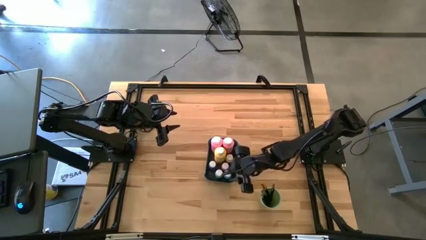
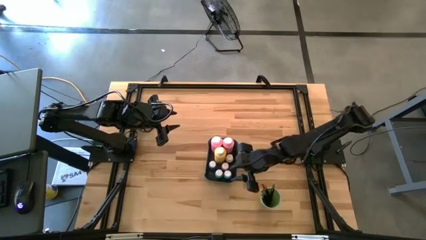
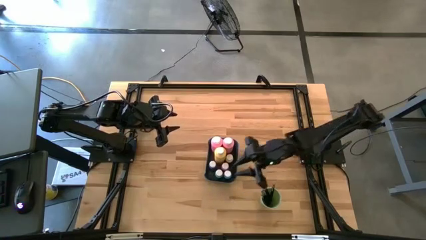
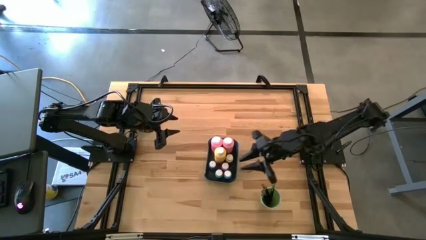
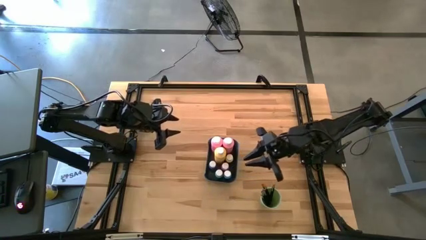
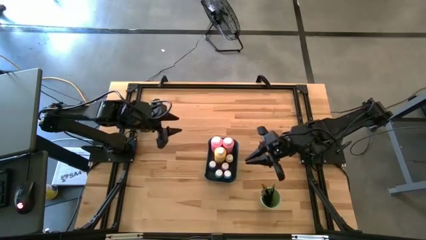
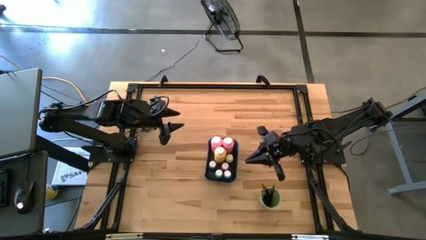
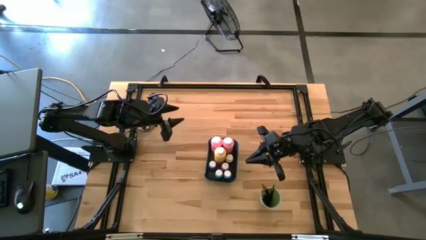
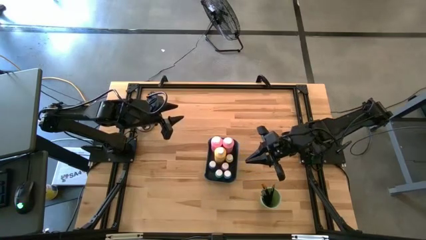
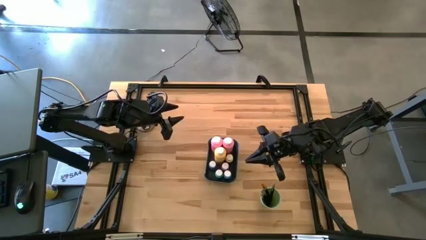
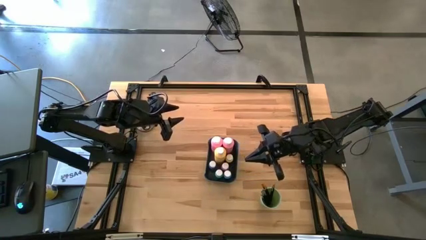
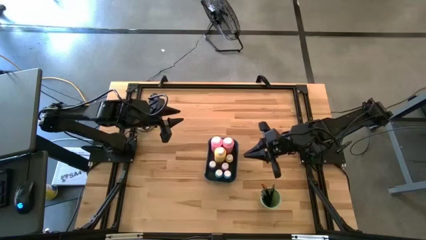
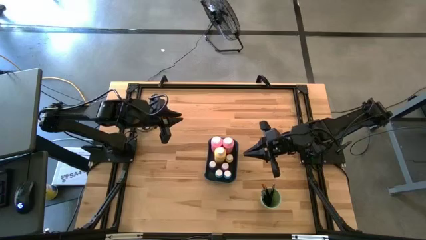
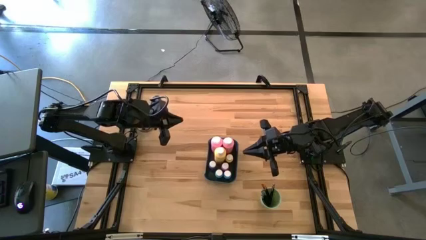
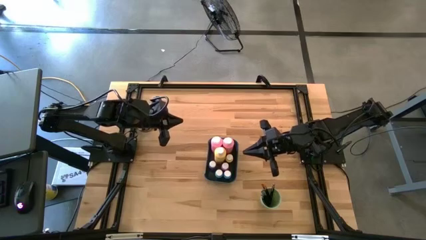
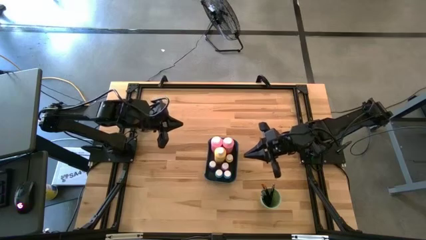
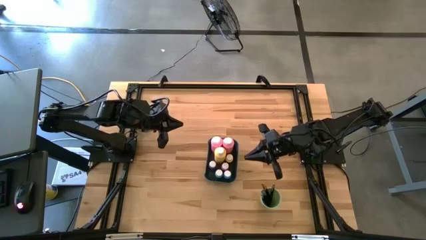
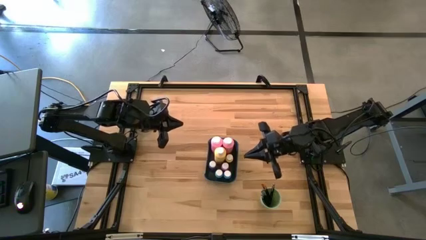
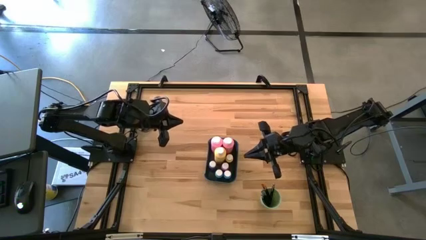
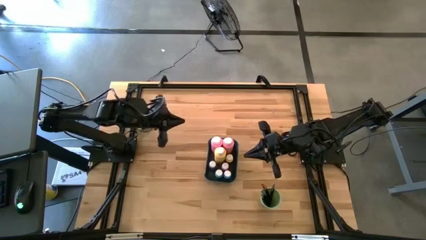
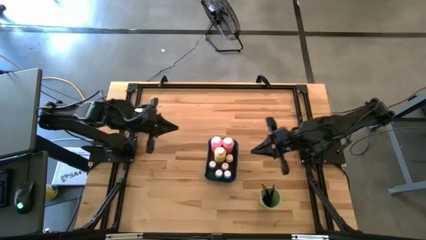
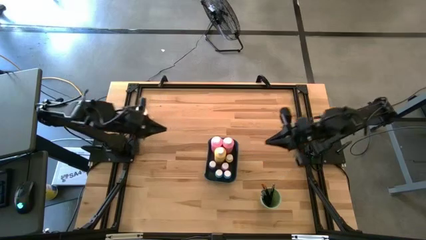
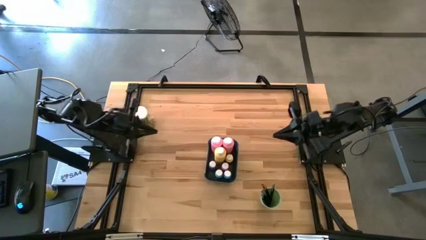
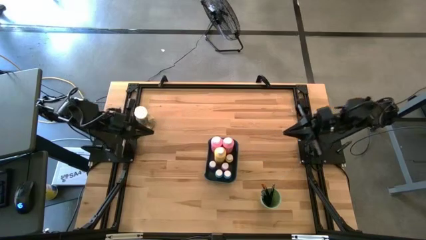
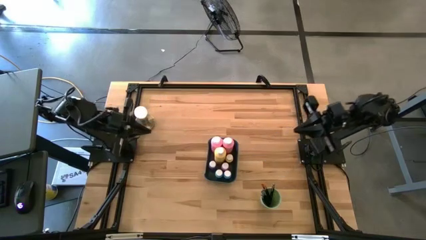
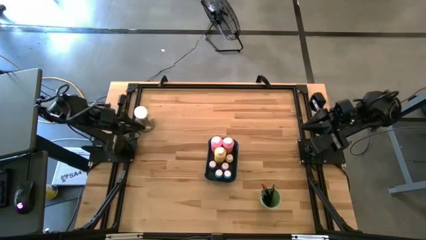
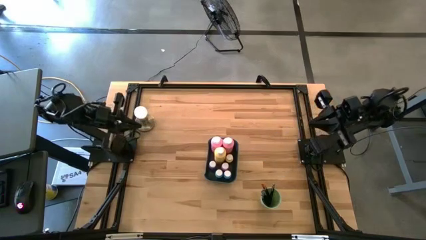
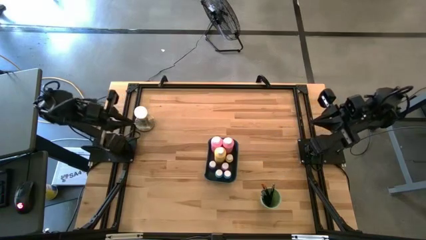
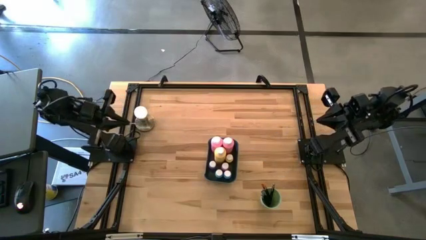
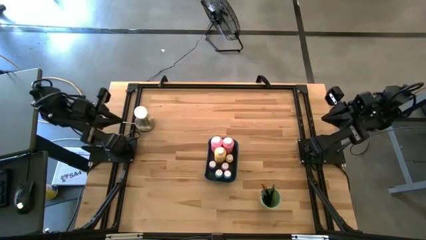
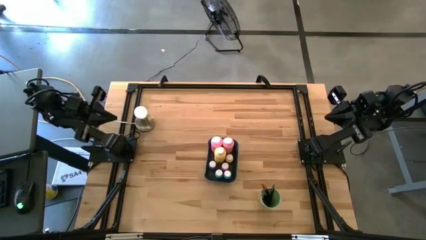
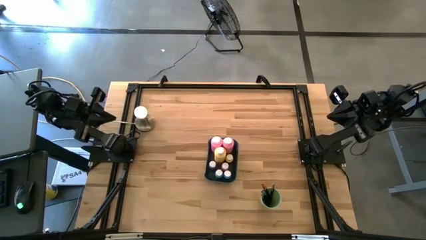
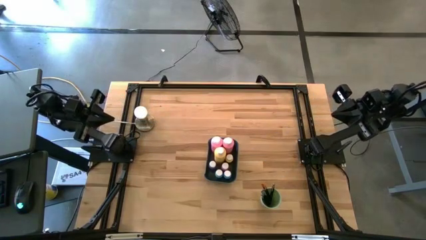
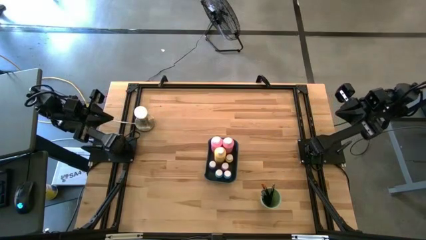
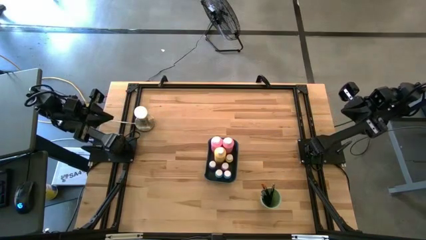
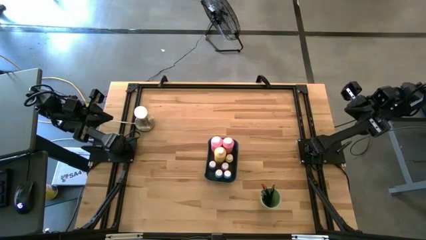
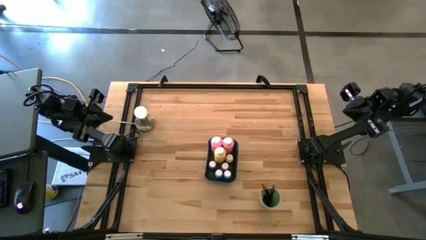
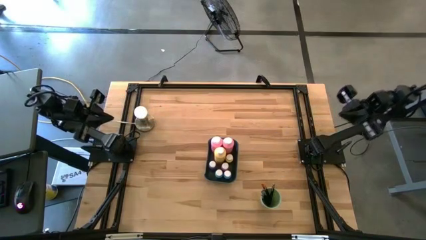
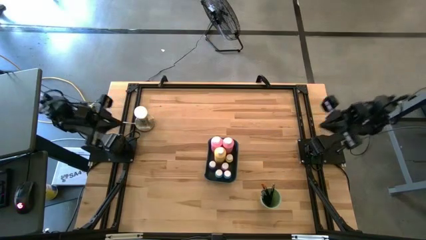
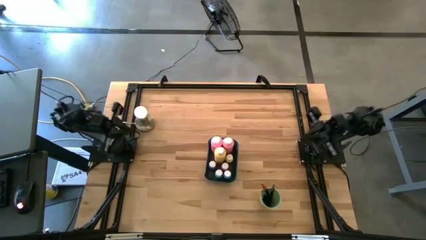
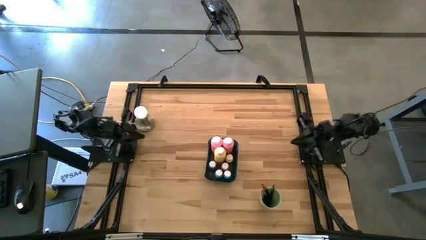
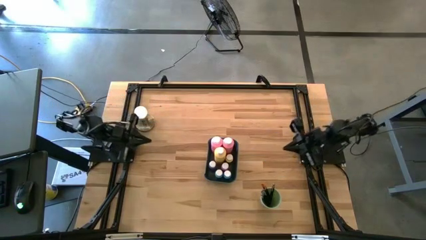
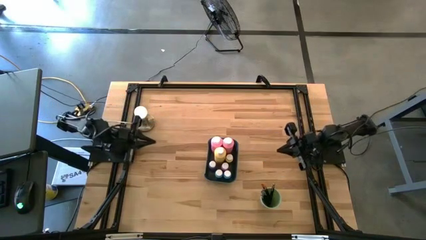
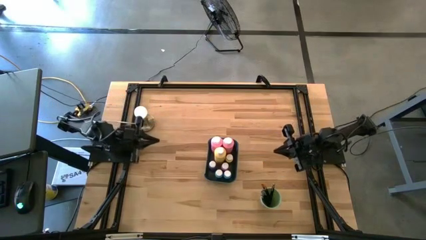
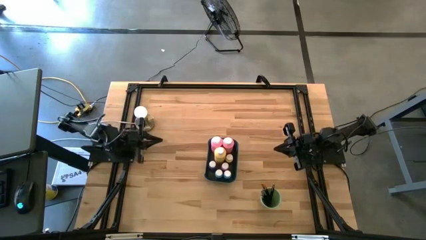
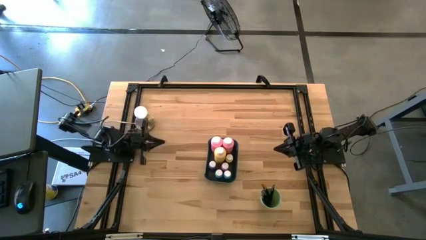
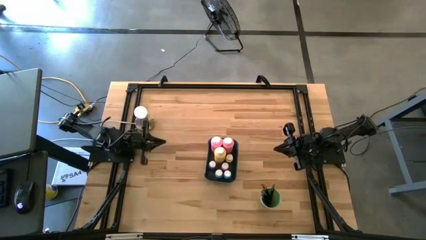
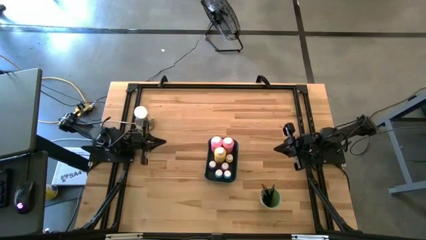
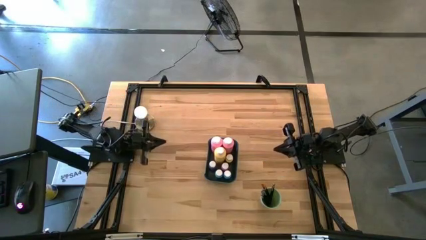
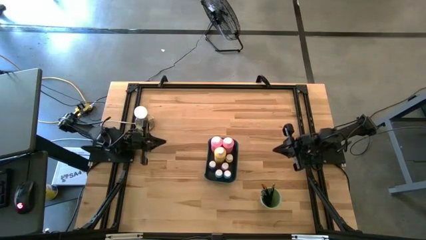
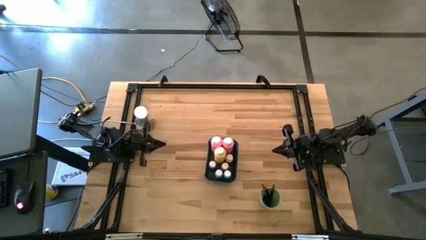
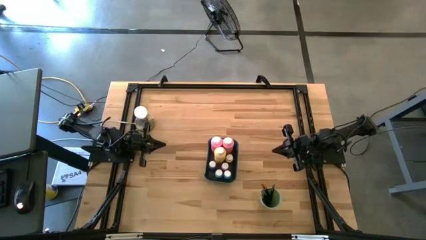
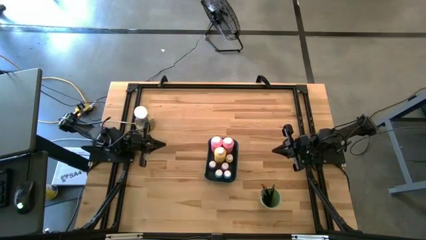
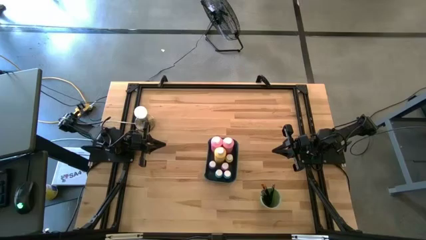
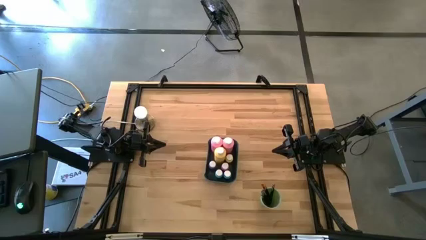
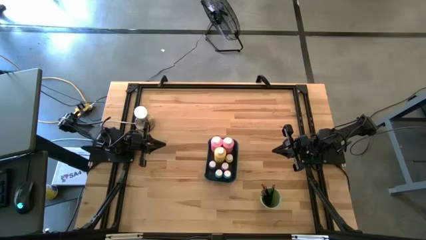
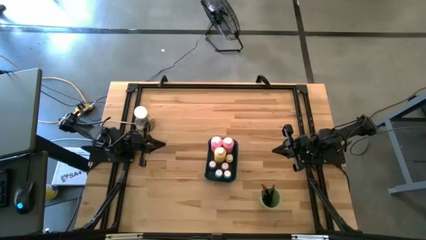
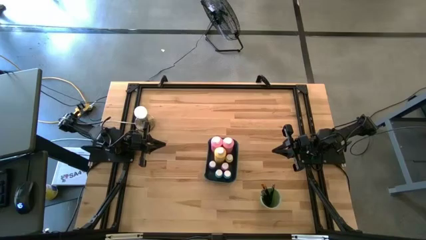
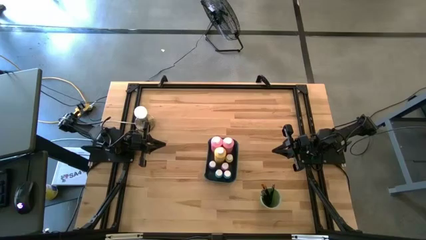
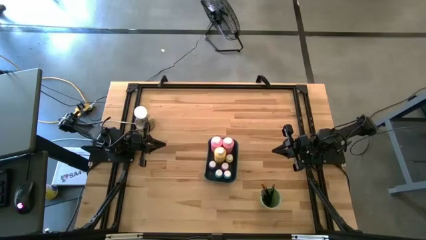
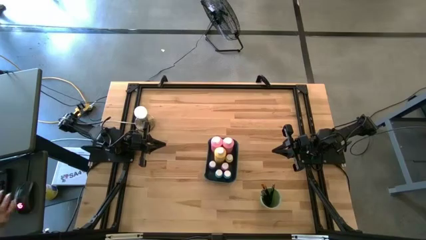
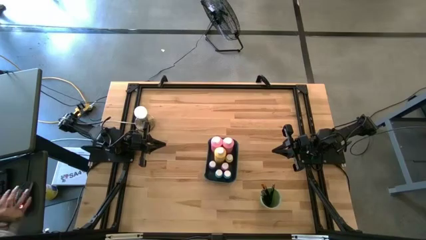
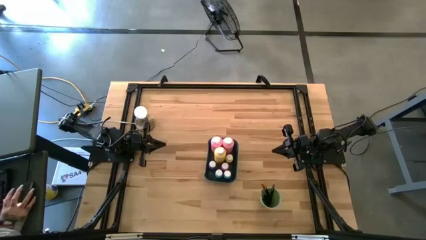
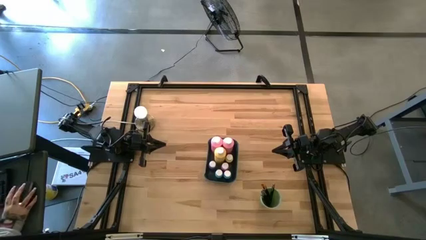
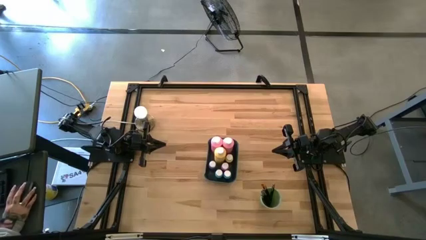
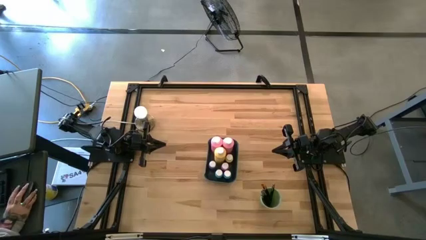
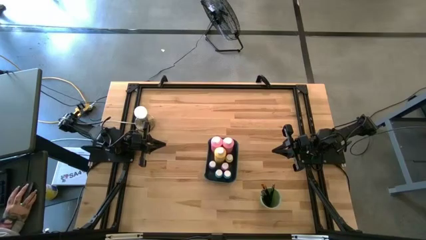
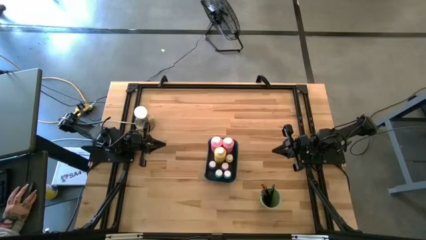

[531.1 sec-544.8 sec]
Task: Pick & Place Paint Supplies
Return to Home Position

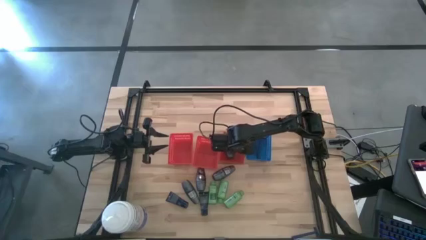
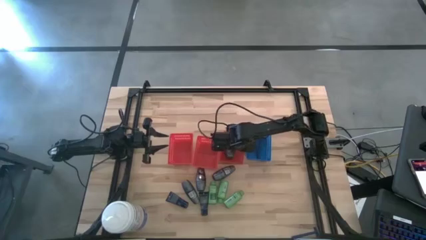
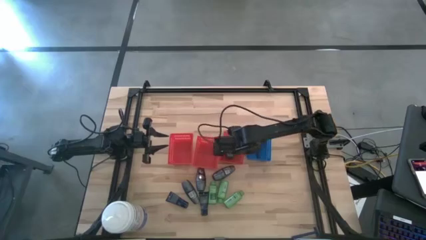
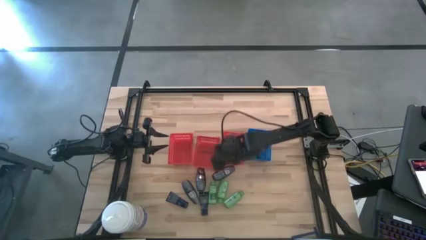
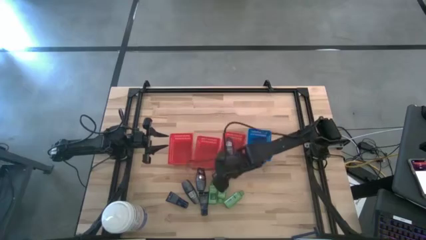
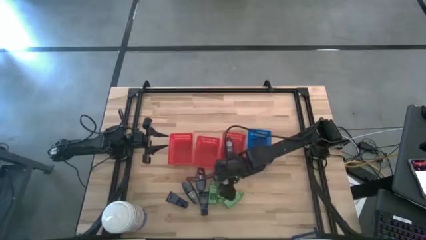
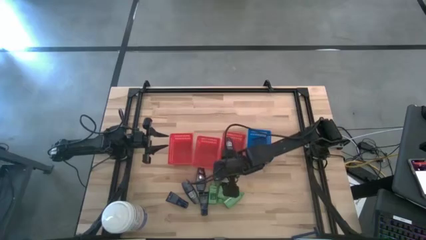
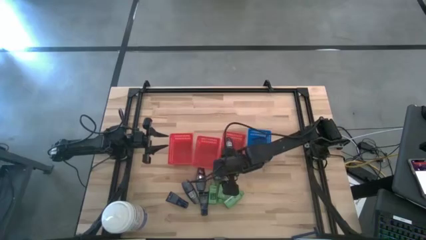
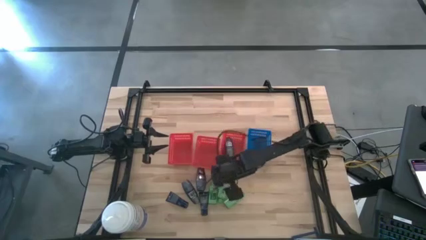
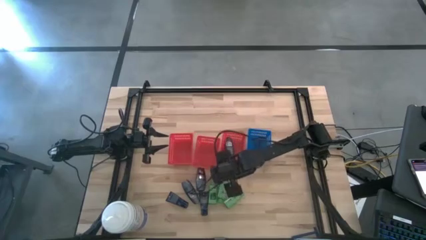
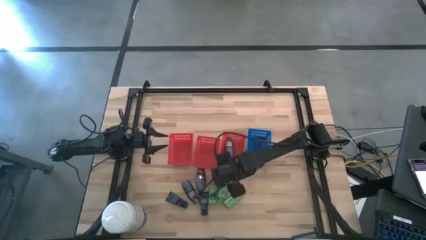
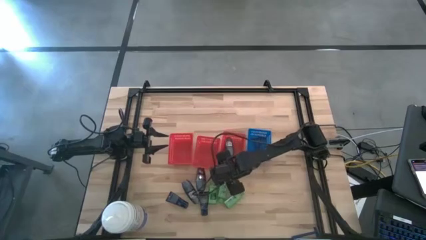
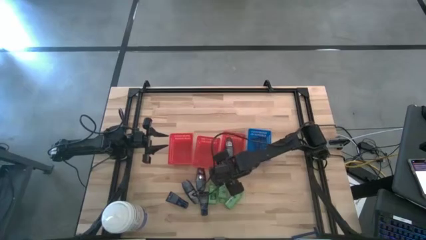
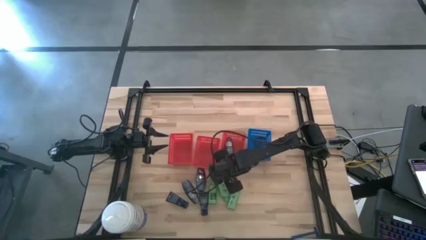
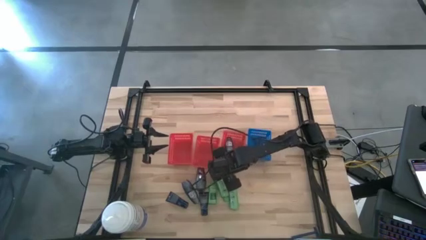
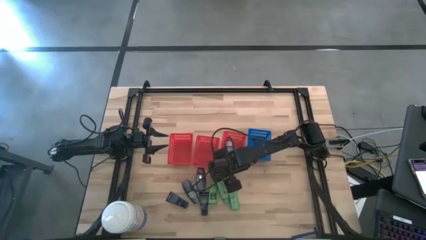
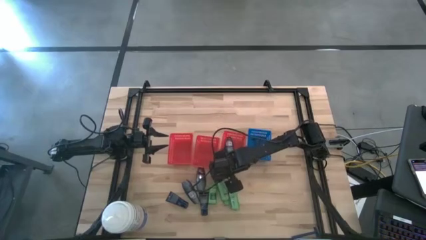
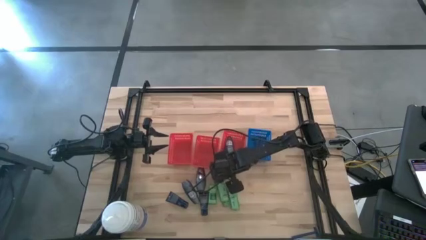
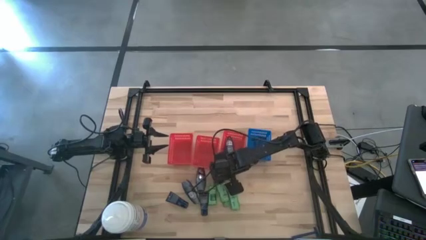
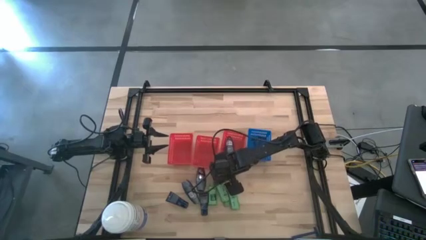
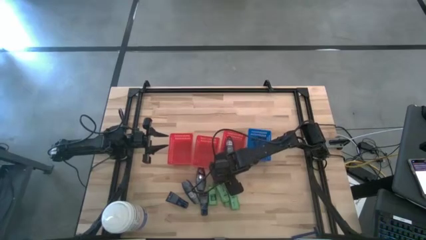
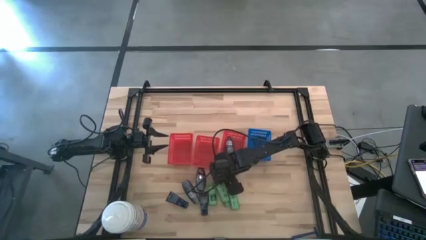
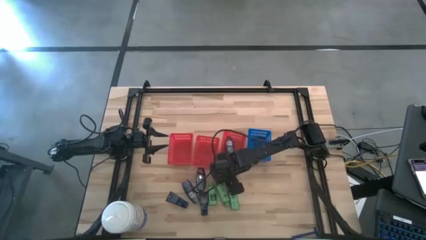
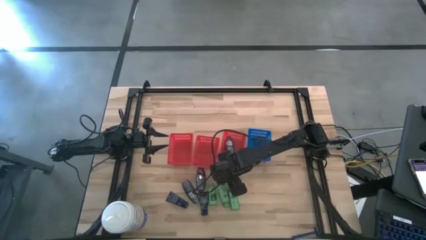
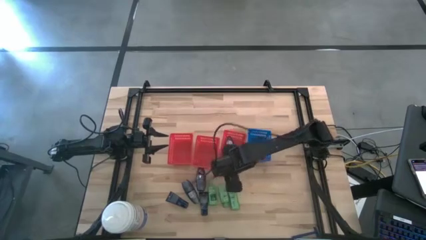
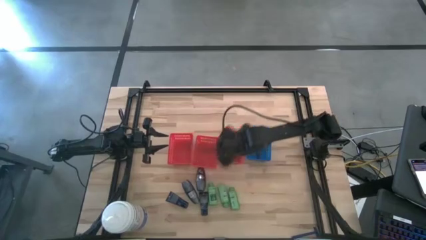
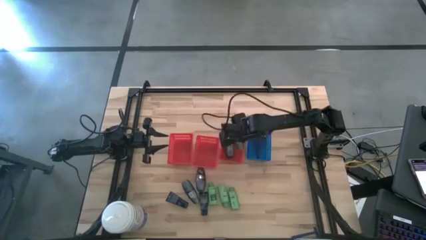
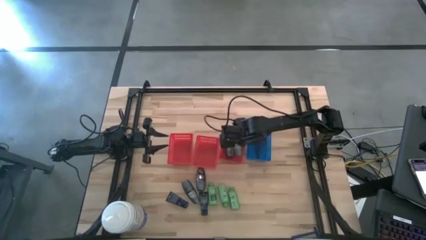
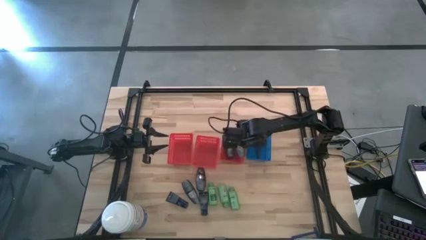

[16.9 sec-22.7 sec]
Task: Pick & Place Travel size toiletries
Put the deodorant into the right red bin
